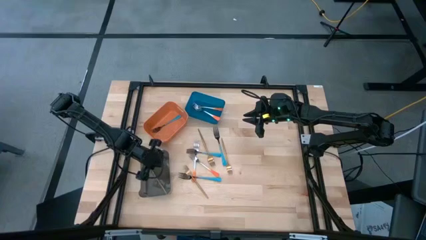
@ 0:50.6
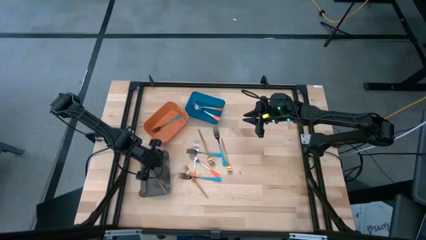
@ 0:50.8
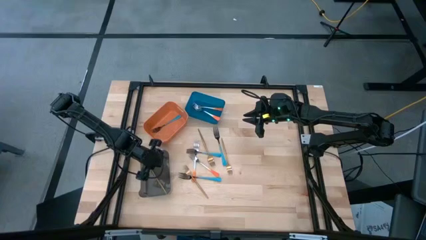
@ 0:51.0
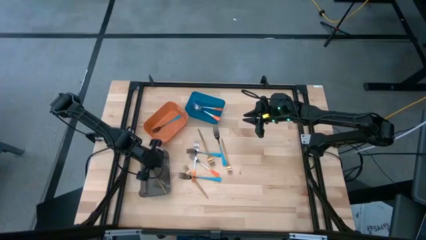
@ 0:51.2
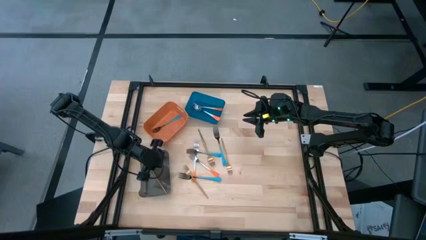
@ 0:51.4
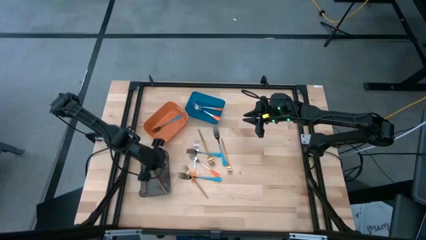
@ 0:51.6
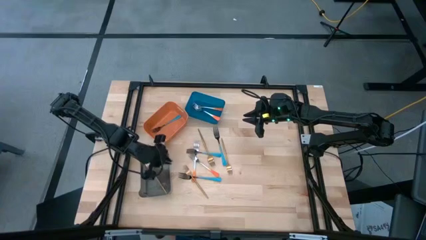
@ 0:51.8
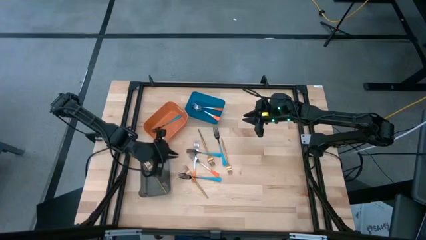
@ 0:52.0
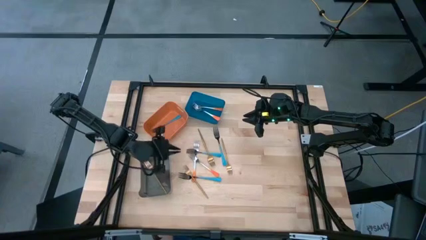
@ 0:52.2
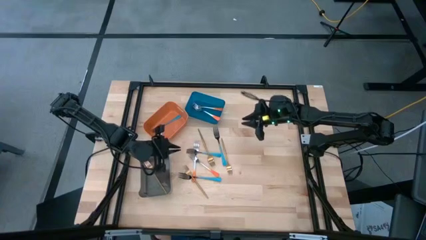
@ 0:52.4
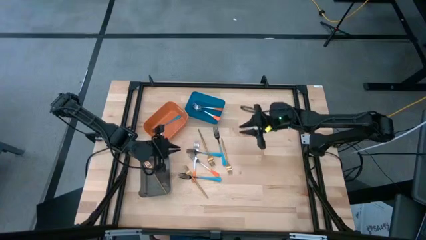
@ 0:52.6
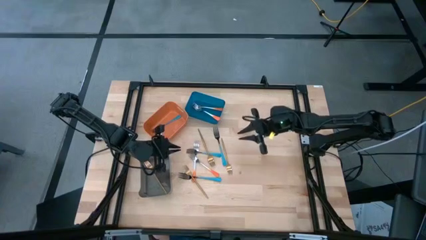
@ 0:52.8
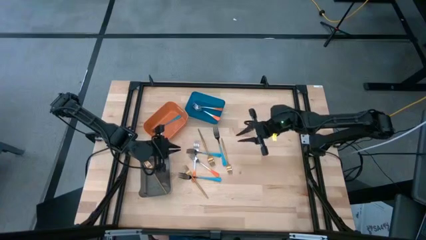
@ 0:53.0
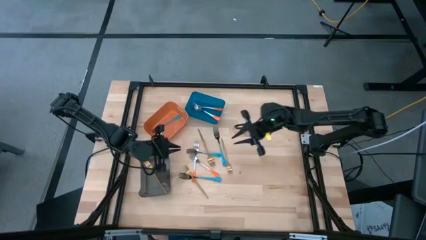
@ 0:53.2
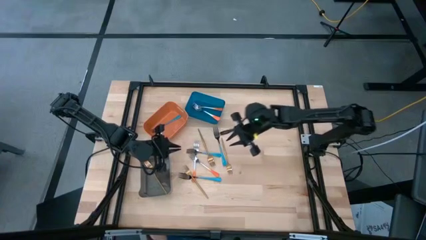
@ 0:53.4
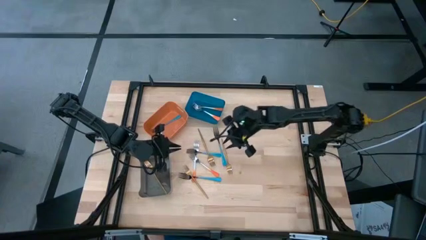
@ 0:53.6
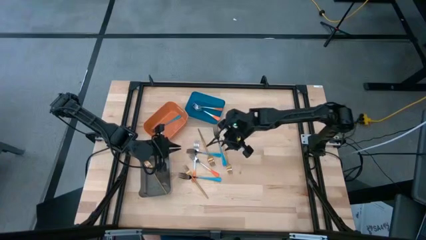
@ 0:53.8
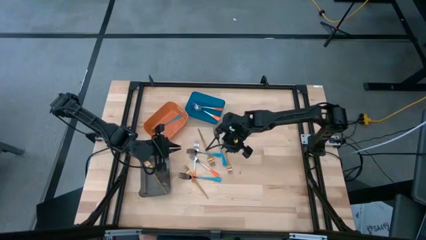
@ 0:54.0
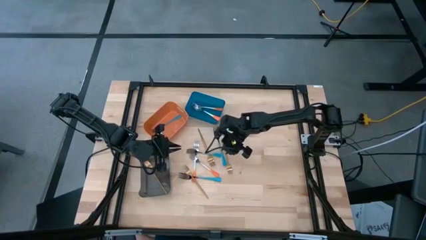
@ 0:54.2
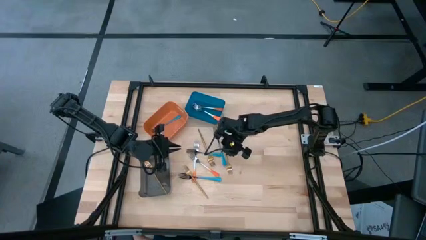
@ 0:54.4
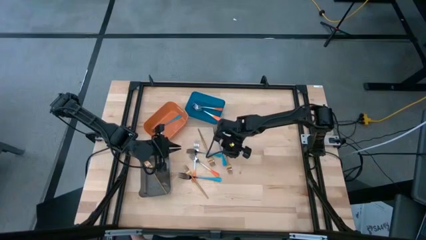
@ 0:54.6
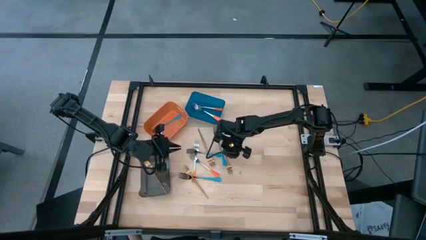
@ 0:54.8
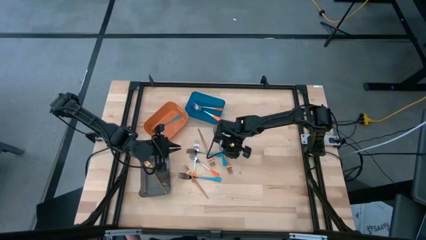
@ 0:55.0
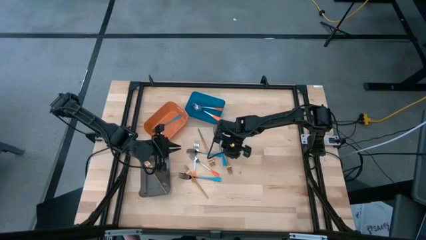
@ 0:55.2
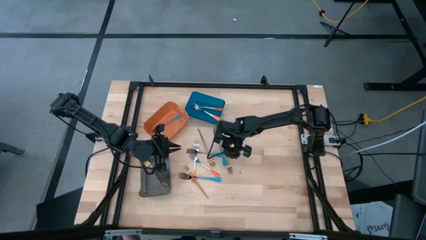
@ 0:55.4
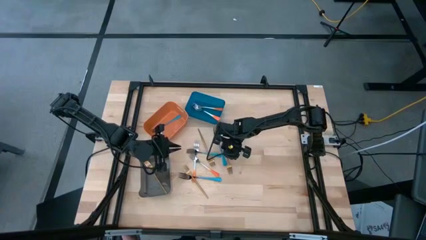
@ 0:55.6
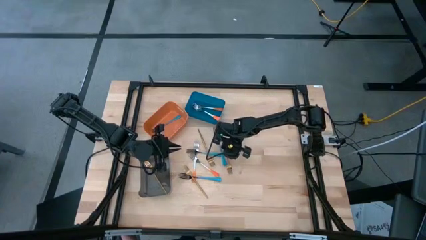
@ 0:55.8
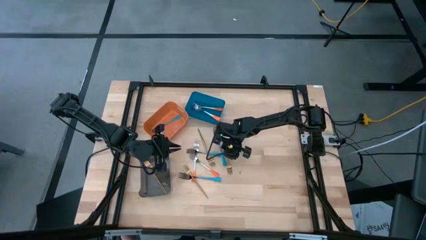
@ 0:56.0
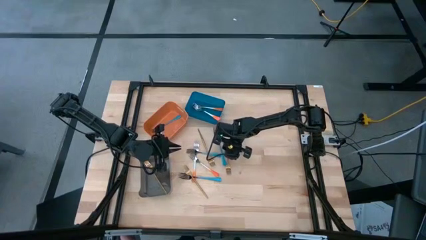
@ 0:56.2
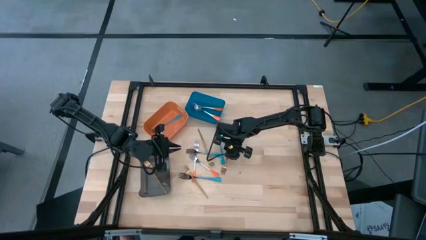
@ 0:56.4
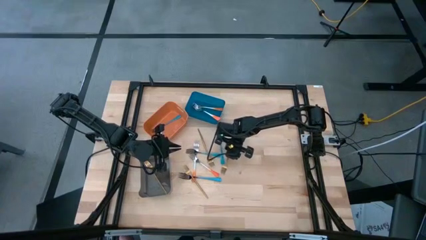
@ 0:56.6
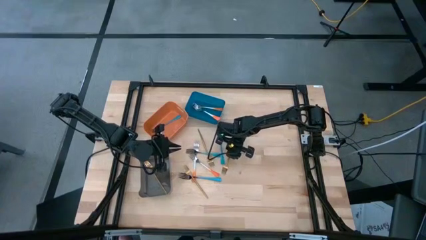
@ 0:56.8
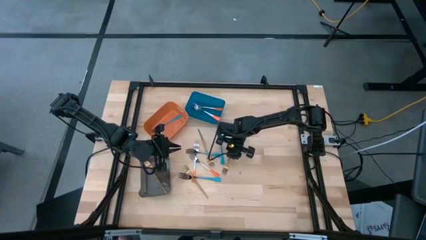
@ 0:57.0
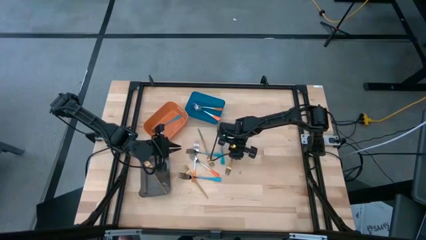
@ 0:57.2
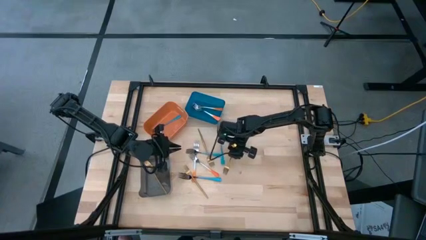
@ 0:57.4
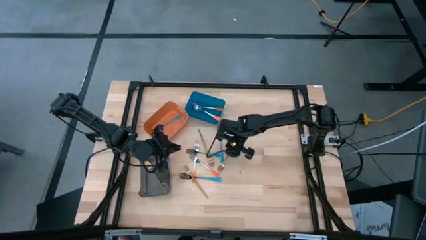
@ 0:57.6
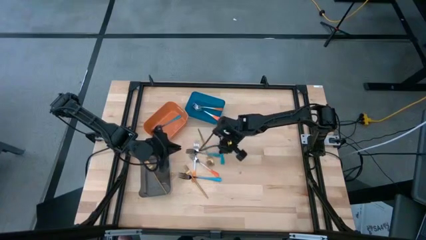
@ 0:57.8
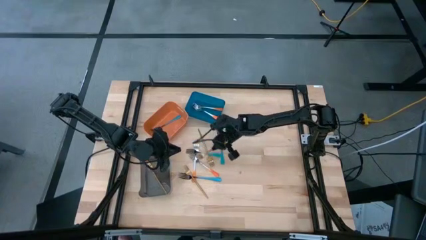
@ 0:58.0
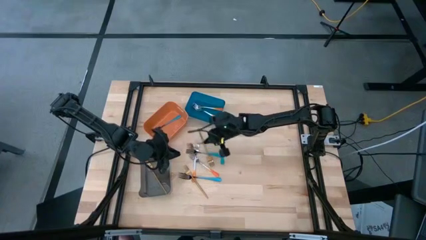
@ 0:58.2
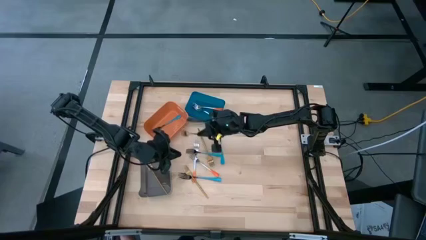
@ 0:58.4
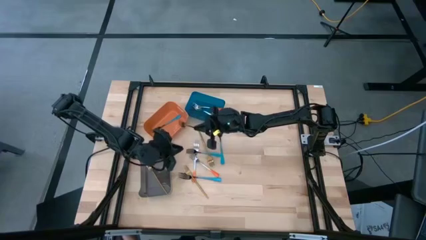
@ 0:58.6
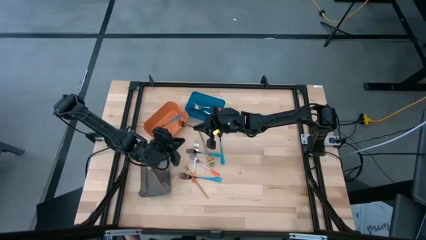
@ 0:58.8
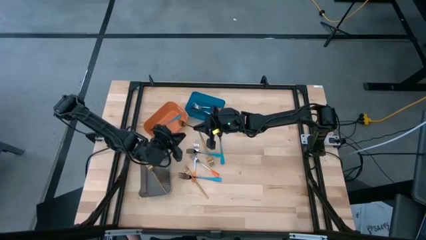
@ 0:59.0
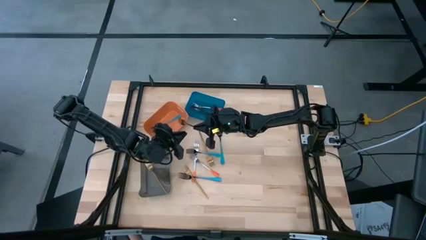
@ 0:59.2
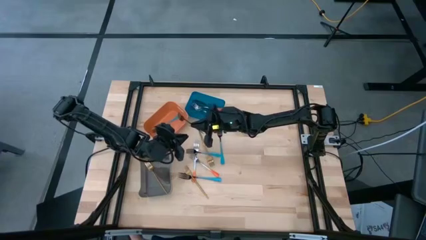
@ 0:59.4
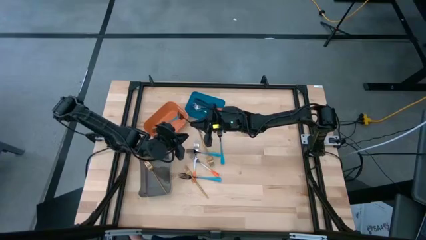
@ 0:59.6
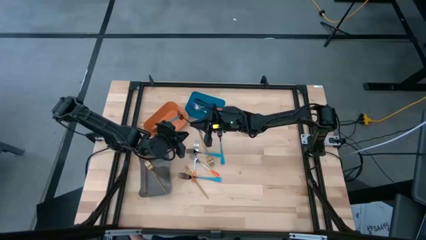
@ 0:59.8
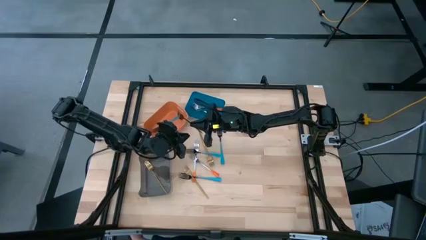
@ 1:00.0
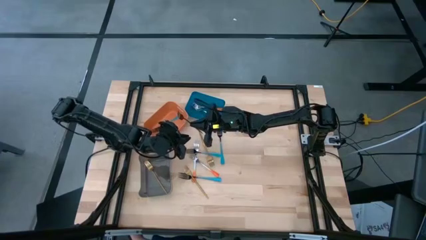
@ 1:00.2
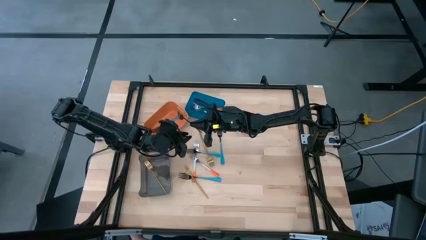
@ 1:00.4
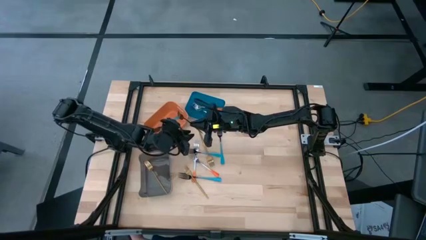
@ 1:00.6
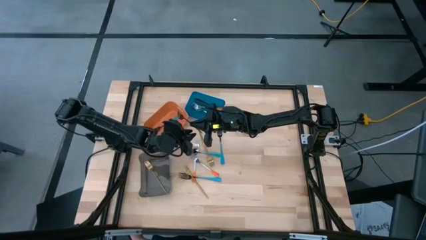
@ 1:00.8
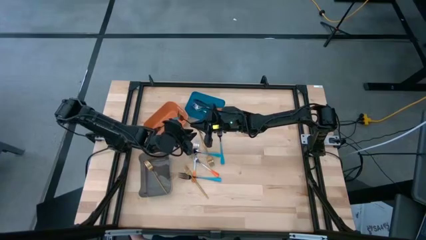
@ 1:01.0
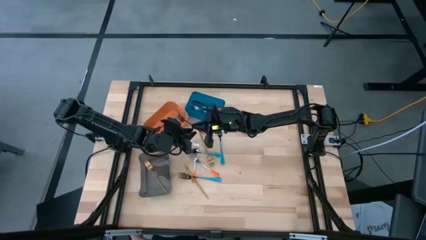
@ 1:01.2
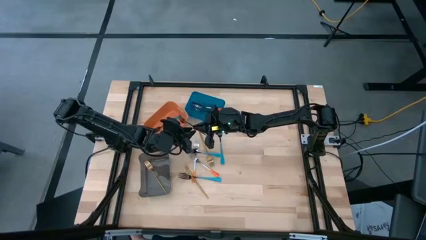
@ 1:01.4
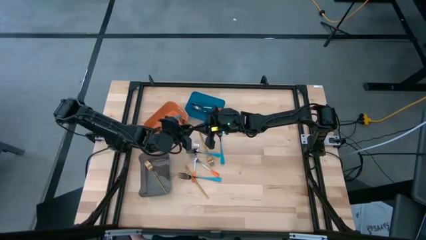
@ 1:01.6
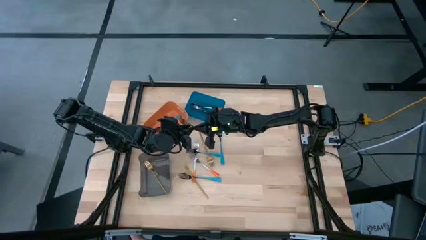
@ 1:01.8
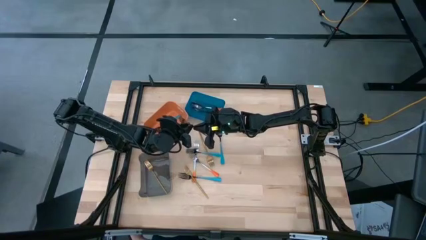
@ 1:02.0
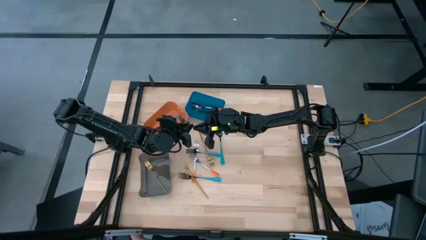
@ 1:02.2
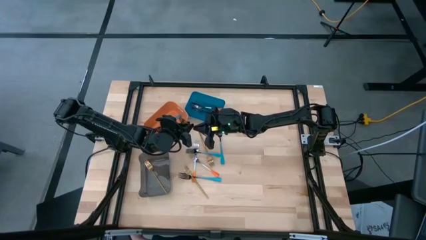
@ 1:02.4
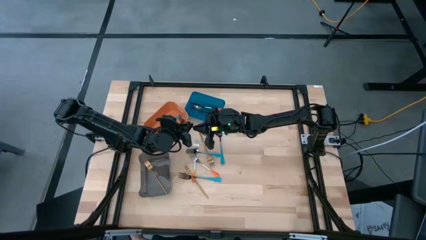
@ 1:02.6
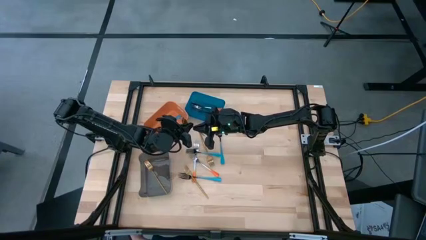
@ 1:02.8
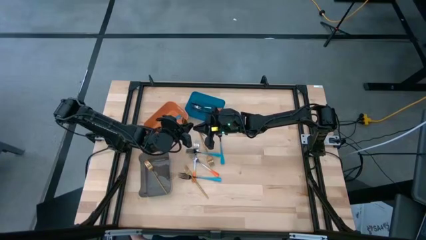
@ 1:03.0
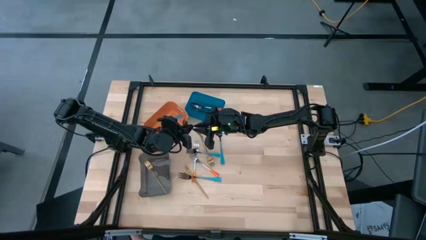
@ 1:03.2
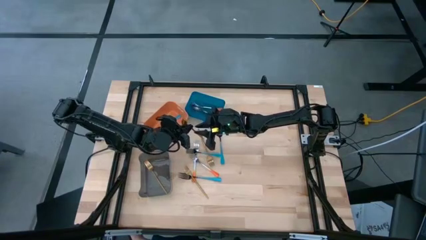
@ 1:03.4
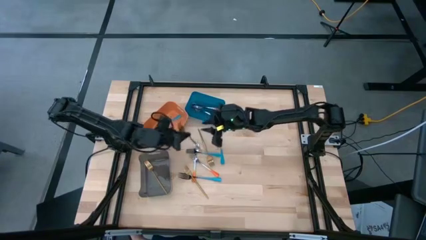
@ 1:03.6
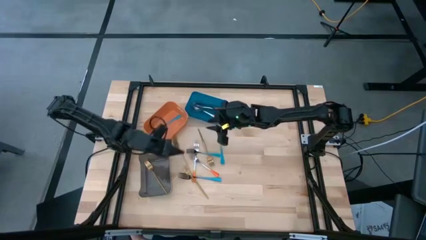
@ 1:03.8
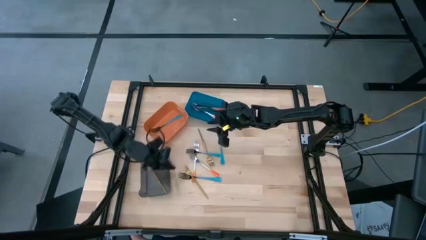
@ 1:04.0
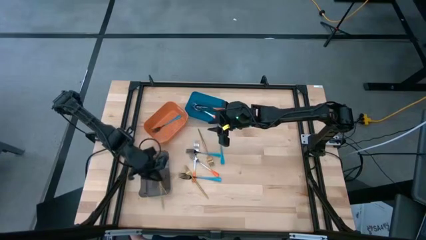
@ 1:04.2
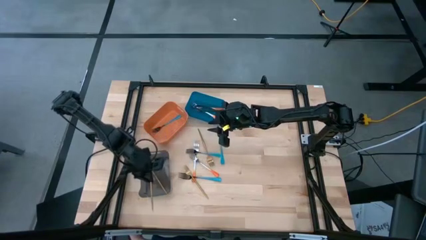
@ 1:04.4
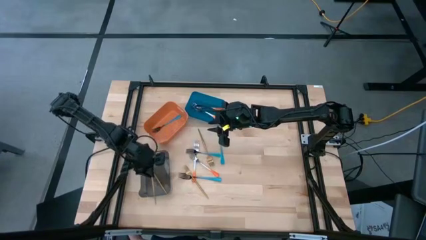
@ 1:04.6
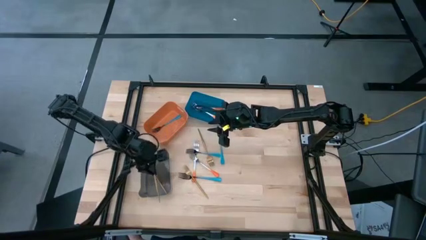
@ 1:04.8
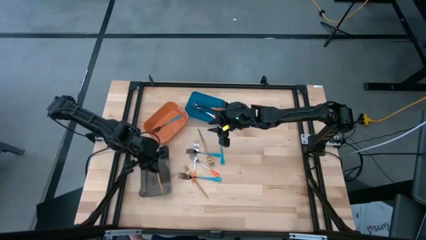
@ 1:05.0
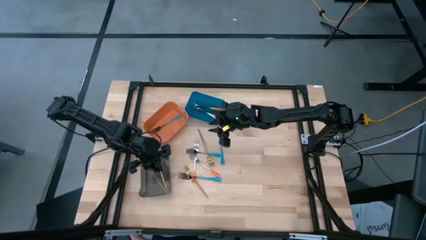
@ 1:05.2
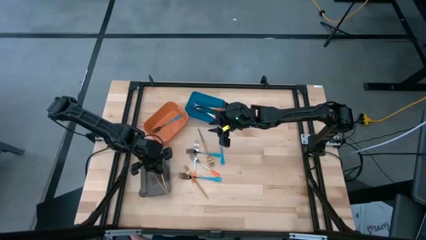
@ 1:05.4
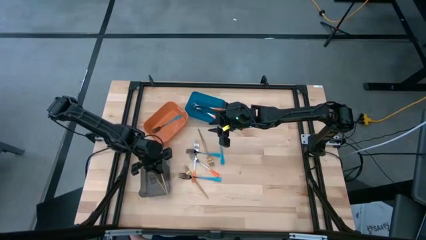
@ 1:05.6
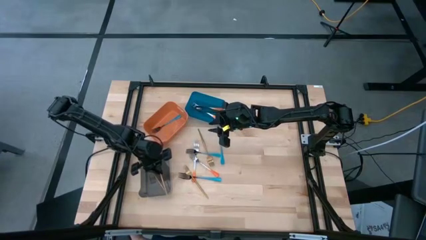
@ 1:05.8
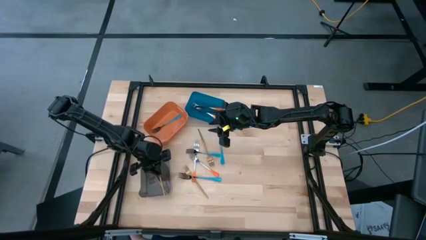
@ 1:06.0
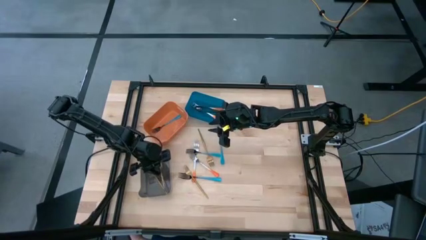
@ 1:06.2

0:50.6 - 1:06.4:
Task: Sort silverware by color (type)
Put the gold fork into the black bin
